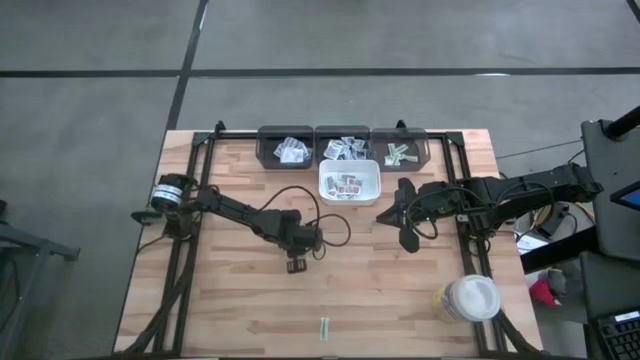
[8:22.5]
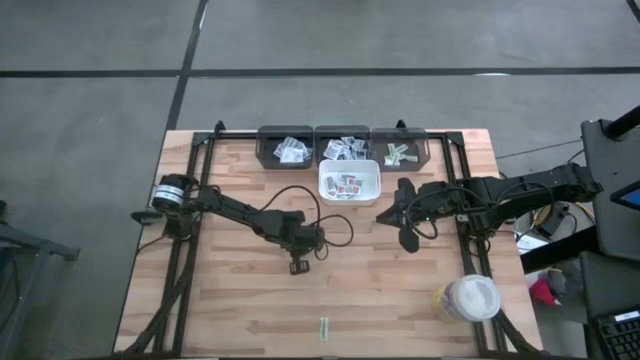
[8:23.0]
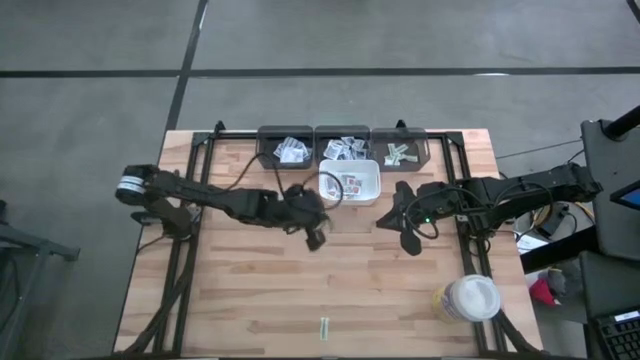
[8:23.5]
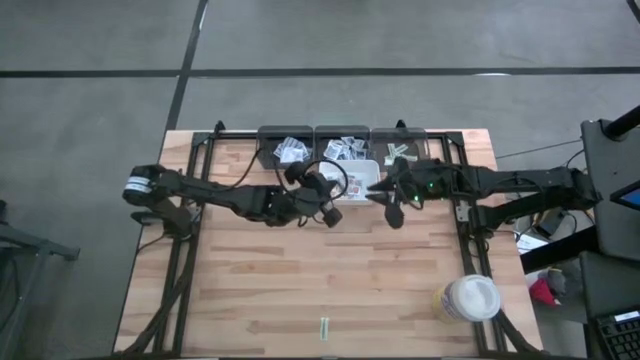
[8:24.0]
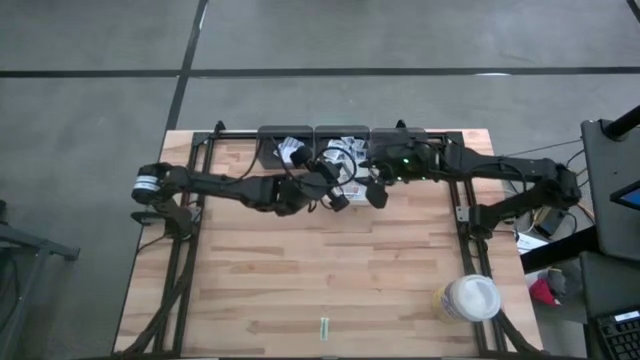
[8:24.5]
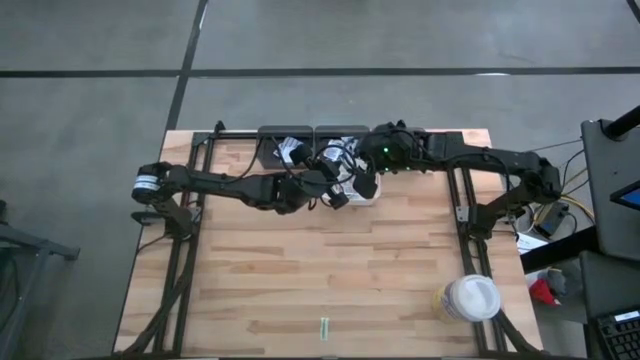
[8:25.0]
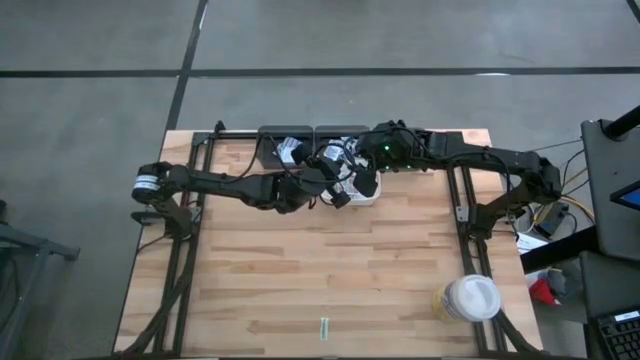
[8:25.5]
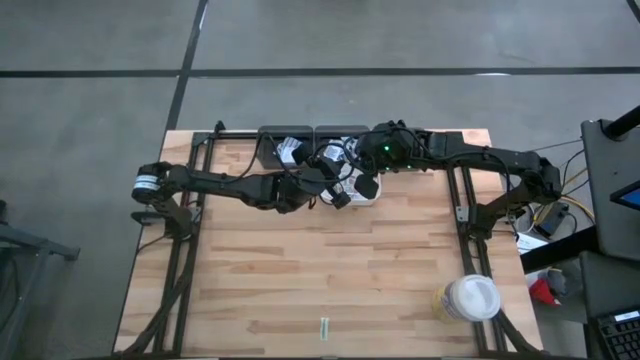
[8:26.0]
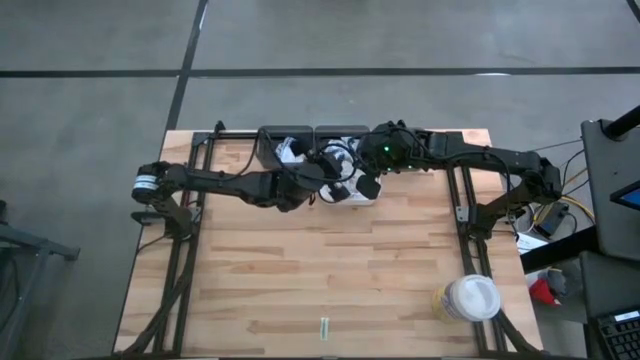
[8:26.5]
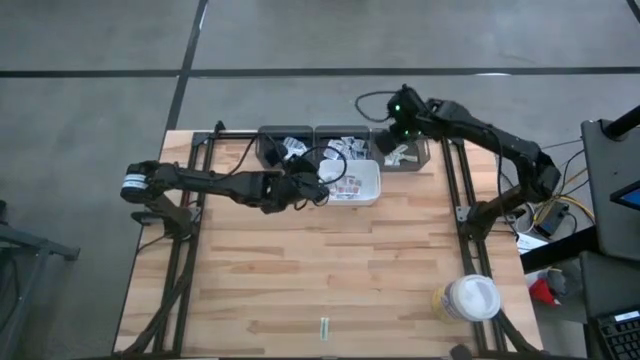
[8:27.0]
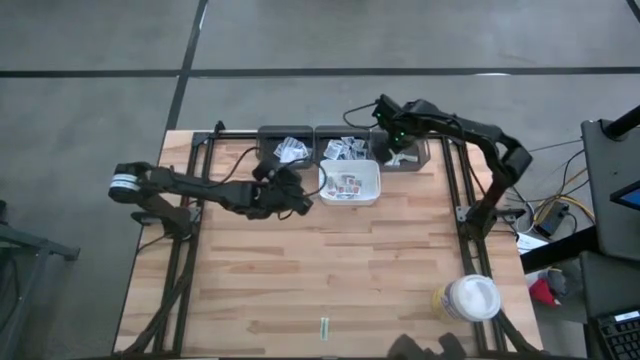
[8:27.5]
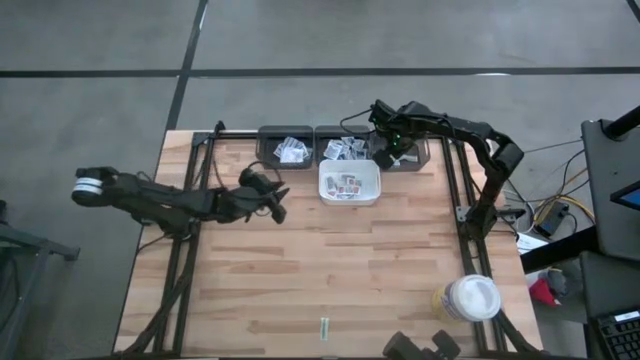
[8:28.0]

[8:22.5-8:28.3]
Task: Pick & Place First Aid Supplies
Put the green bandage pack into the right gray bin

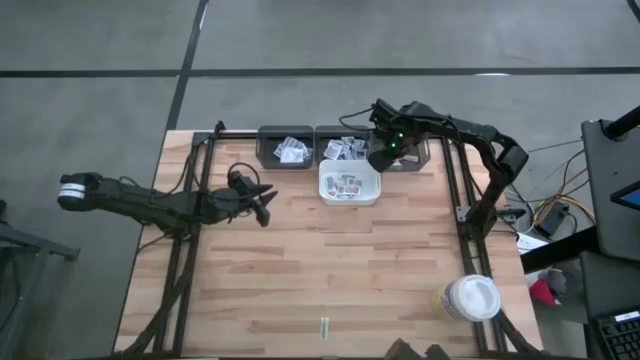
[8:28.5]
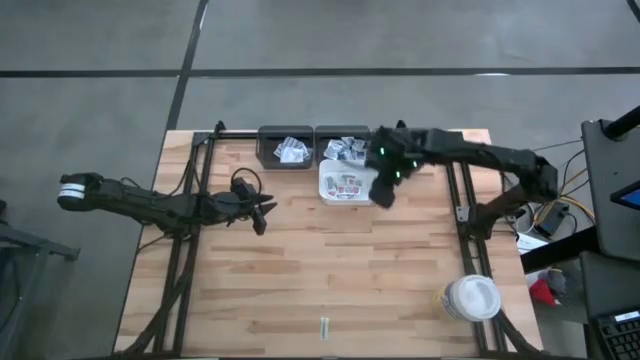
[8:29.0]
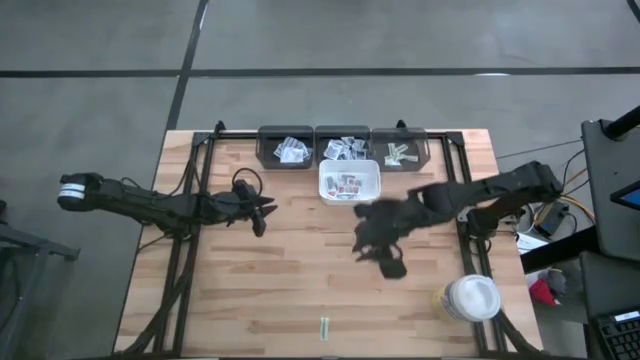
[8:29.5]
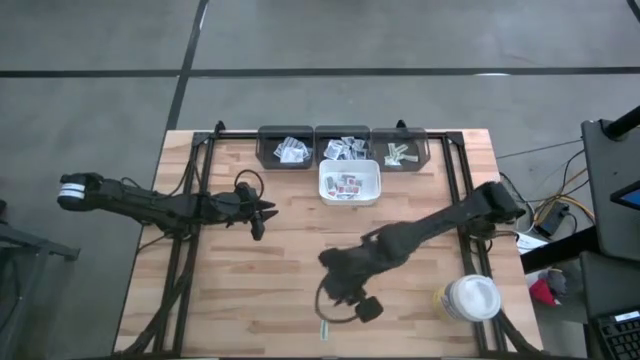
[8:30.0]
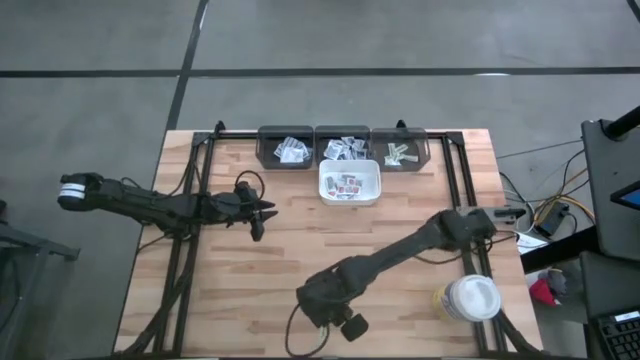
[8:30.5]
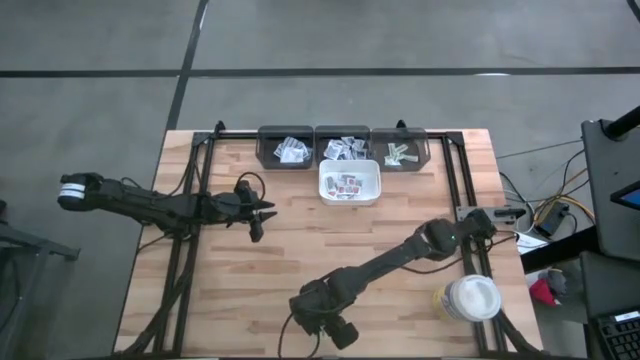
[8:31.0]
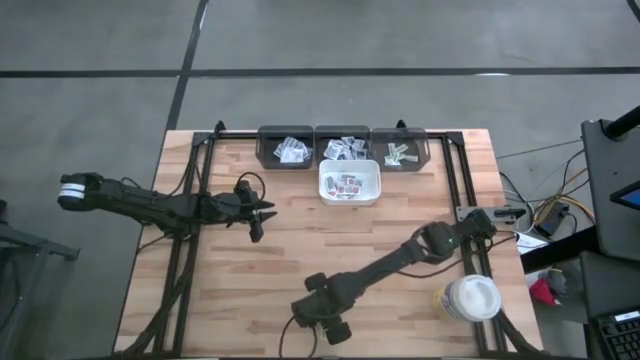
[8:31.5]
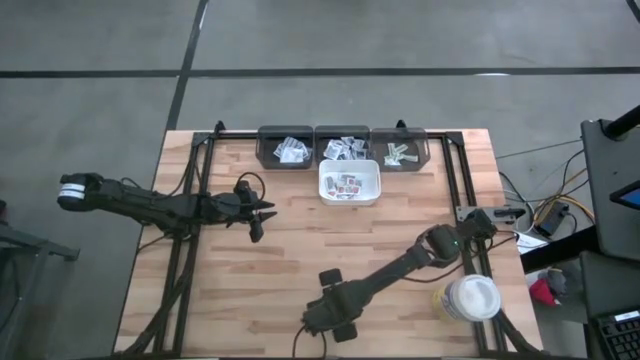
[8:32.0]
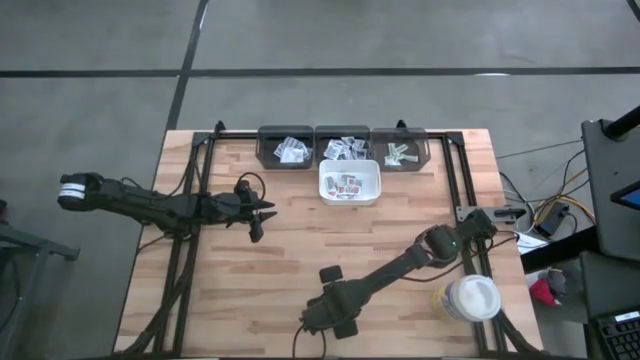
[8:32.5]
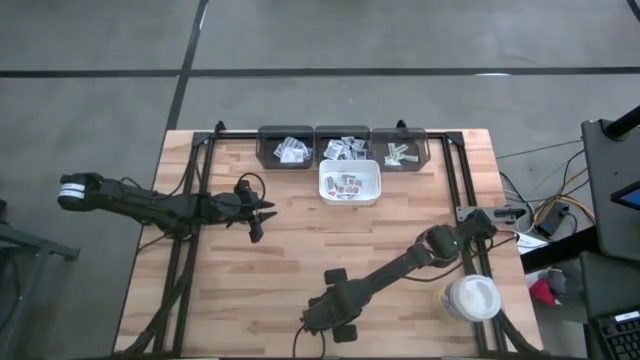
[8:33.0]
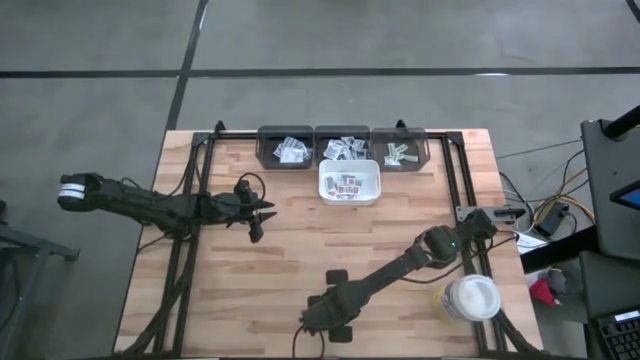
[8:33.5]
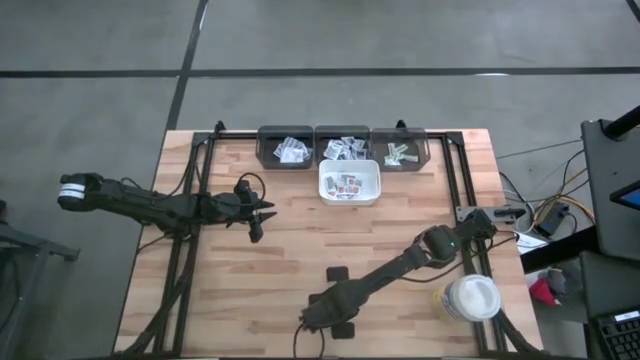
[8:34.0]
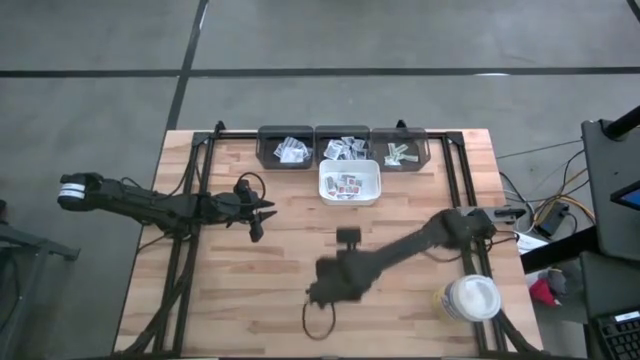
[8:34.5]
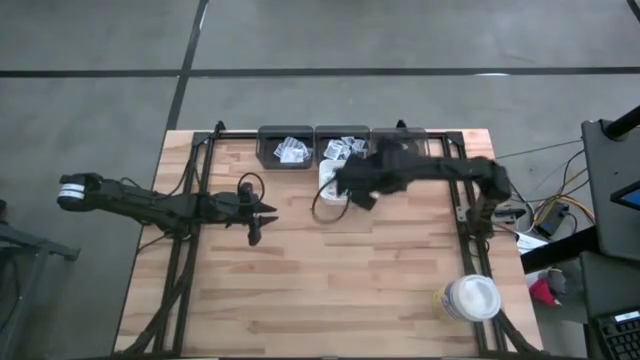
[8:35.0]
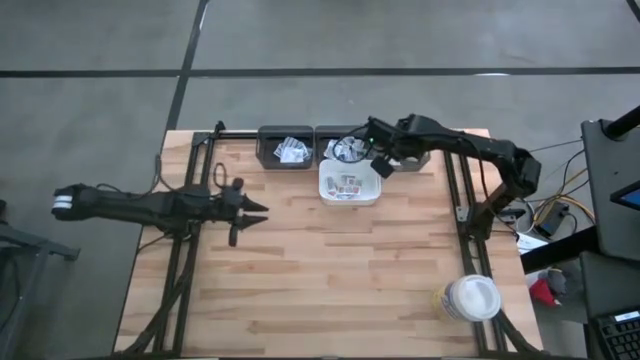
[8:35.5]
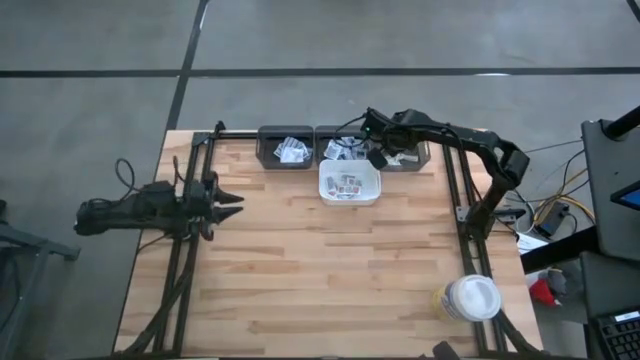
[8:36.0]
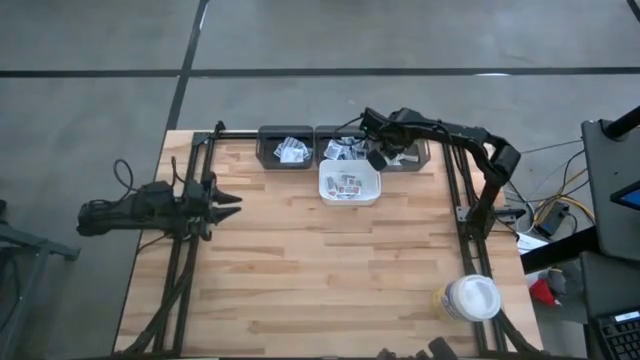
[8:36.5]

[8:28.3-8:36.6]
Put the green bandage pack into the right gray bin

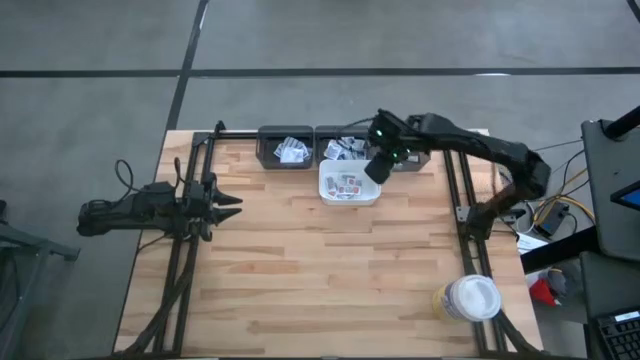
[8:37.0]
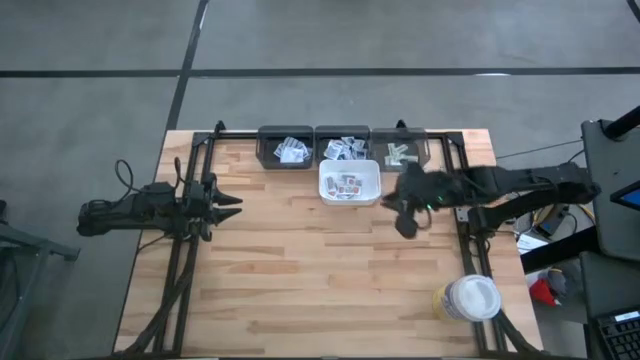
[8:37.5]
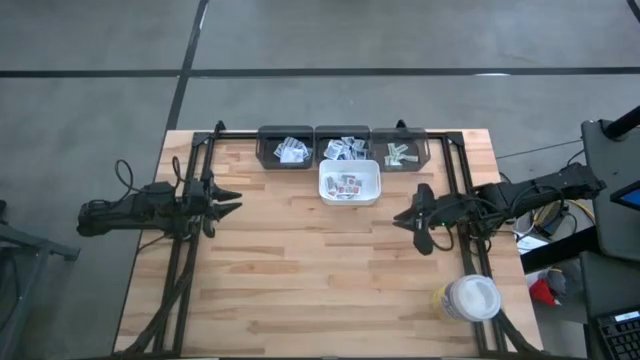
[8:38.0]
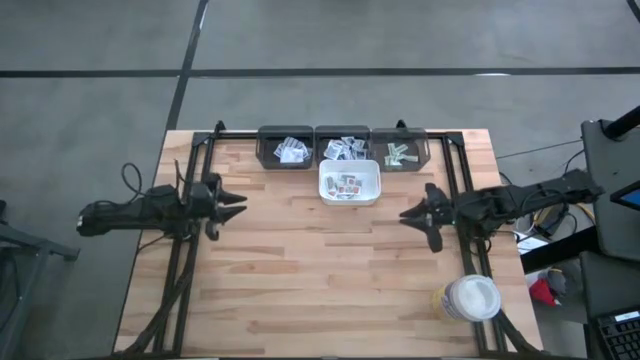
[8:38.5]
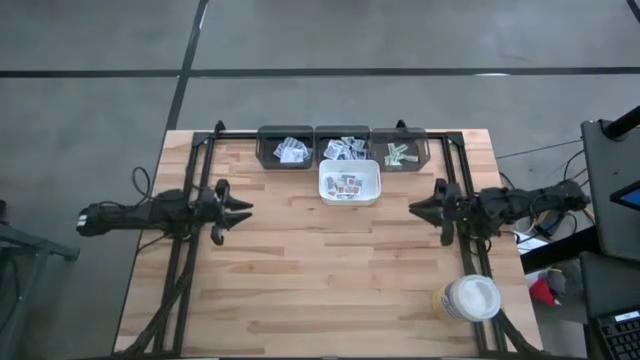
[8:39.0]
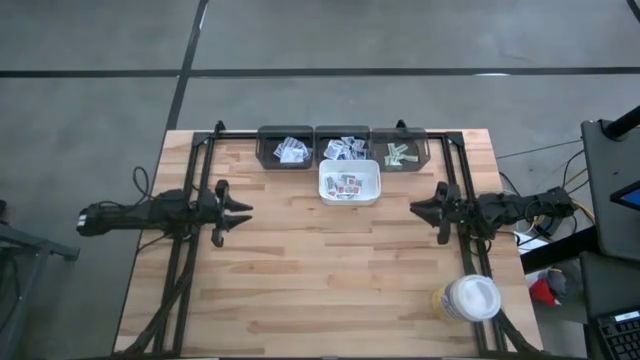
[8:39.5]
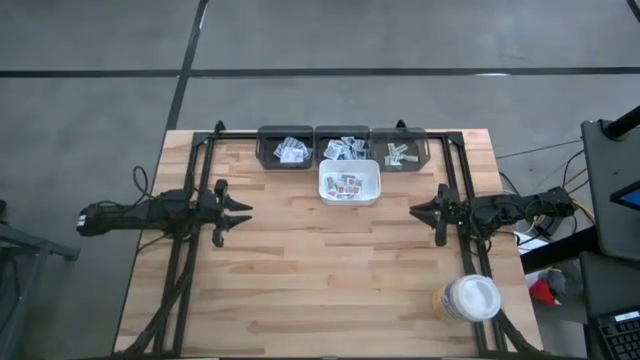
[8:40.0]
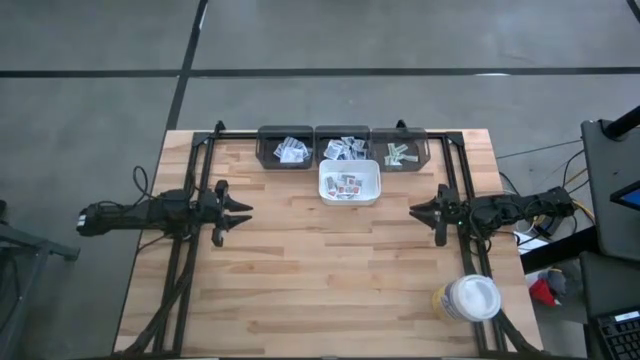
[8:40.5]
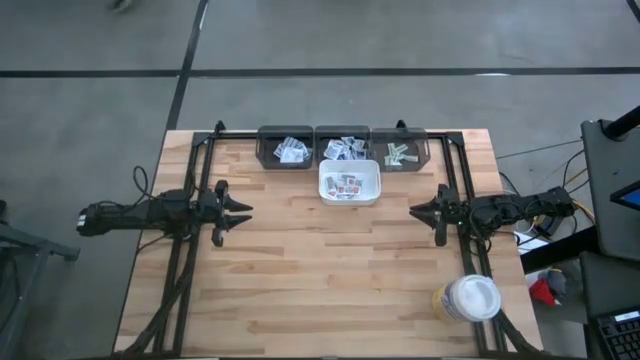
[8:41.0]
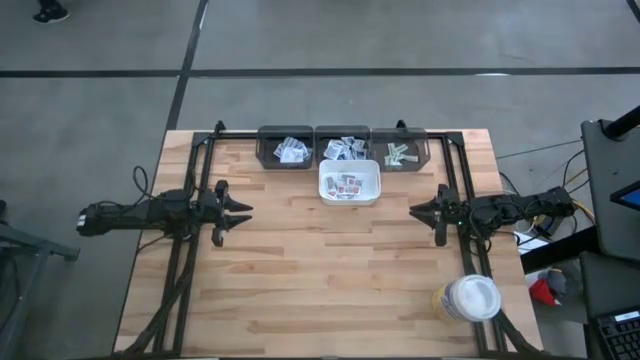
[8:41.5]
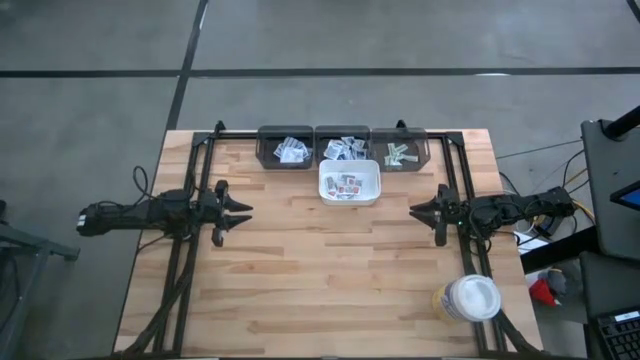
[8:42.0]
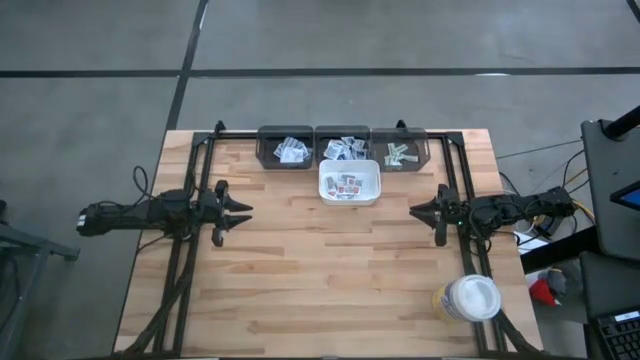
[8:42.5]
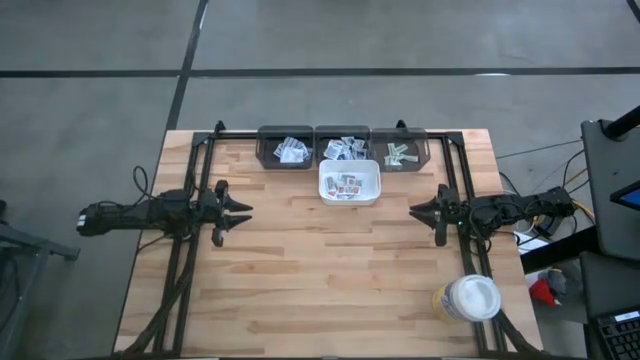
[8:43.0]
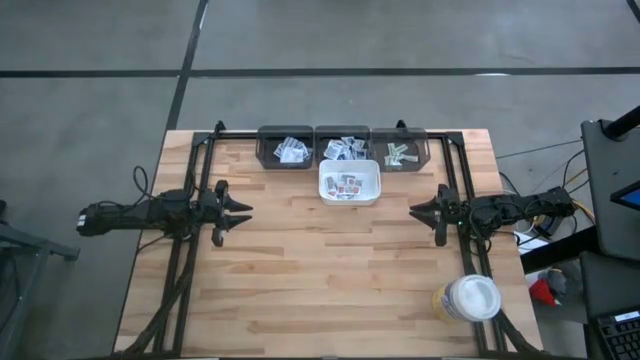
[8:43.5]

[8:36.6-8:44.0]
Return to Home Position

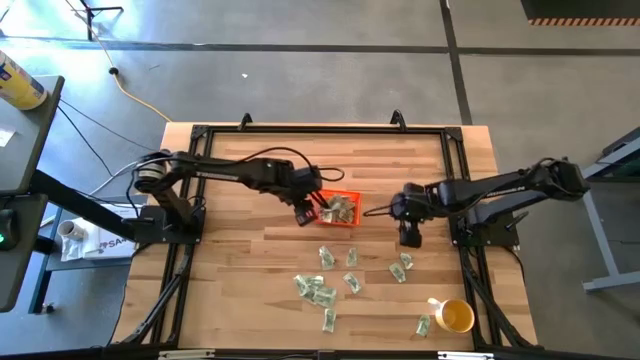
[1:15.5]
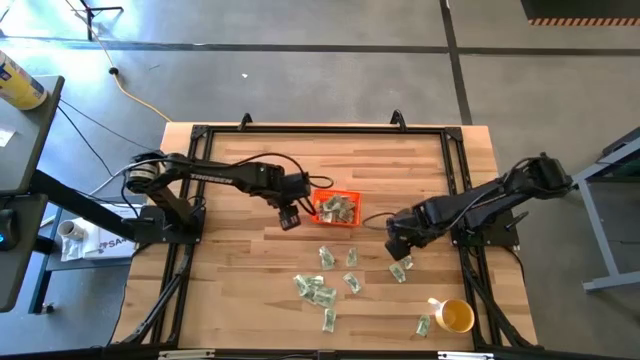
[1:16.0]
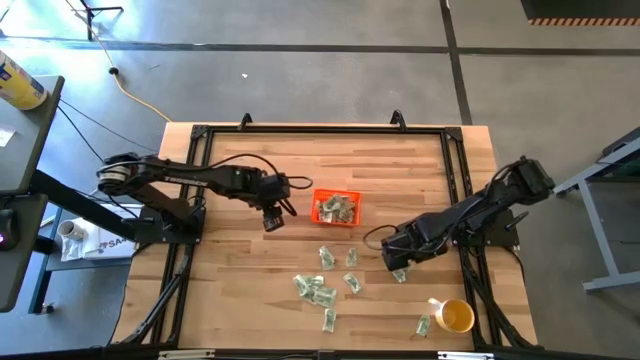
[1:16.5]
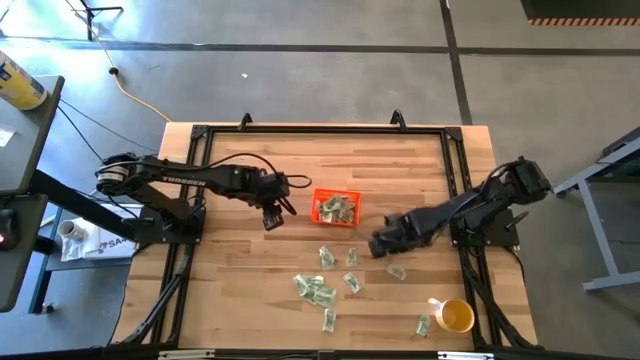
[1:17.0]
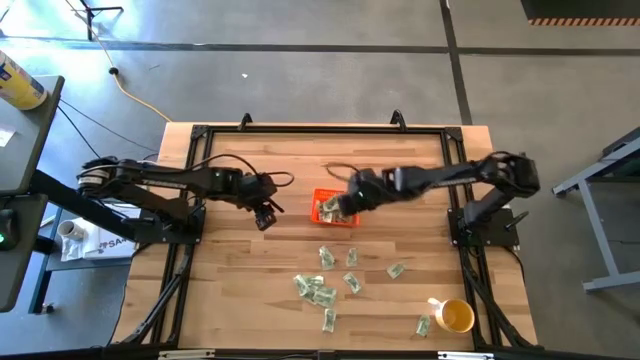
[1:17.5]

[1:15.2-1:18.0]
Task: Pick and place Stevia / Truvia into bins
Put the stevia packet into the orange bin
